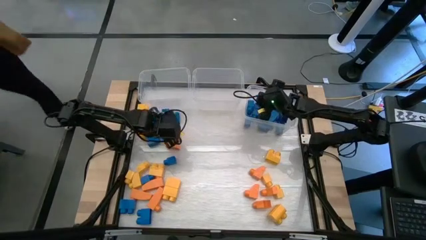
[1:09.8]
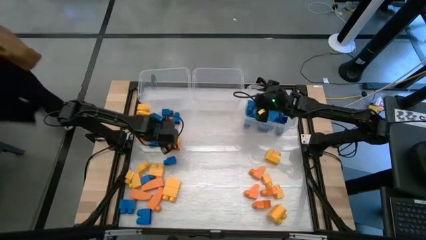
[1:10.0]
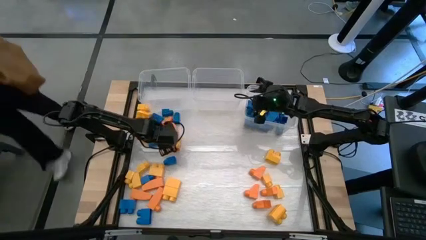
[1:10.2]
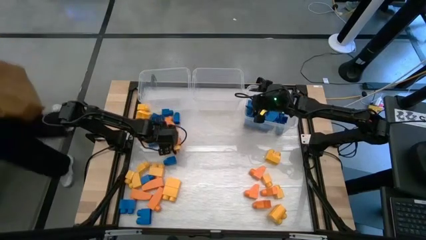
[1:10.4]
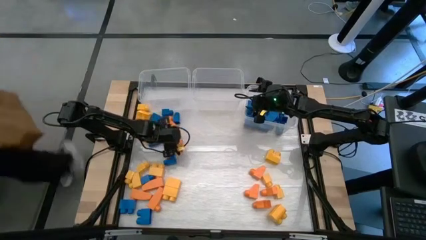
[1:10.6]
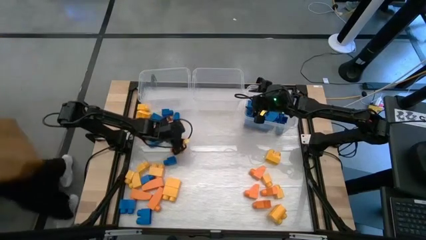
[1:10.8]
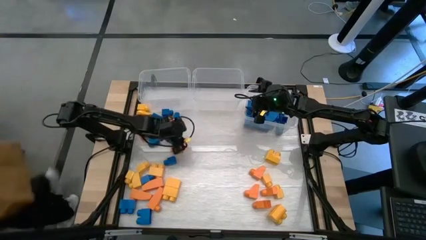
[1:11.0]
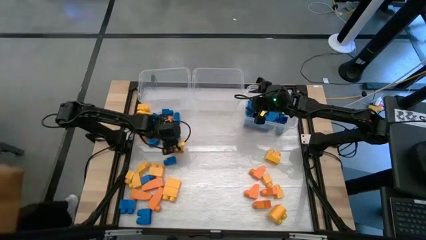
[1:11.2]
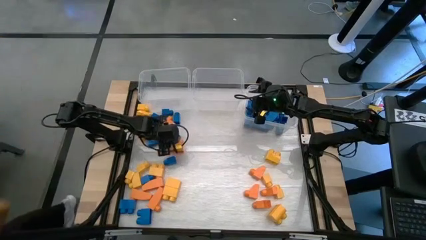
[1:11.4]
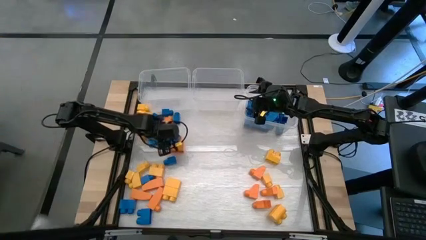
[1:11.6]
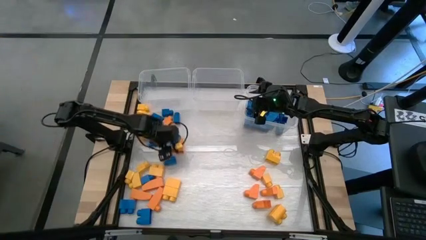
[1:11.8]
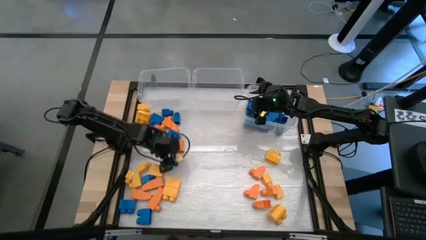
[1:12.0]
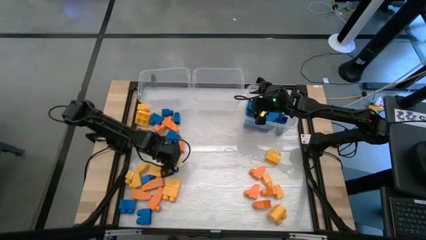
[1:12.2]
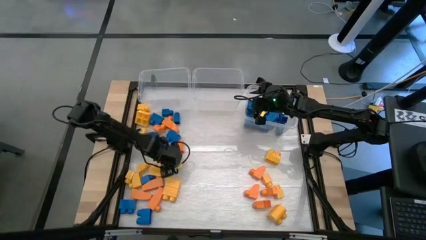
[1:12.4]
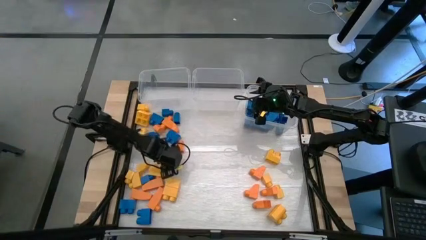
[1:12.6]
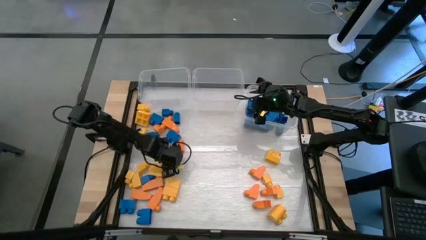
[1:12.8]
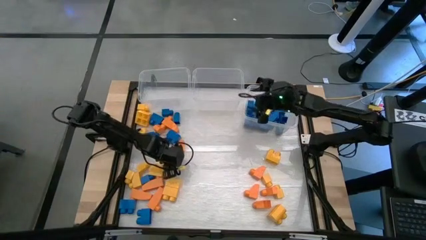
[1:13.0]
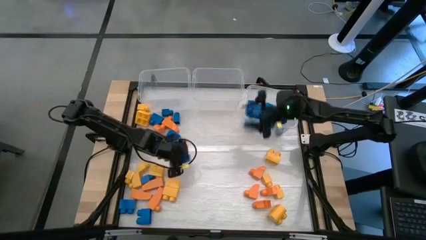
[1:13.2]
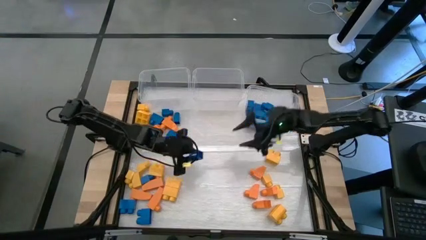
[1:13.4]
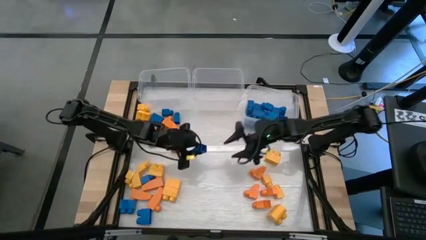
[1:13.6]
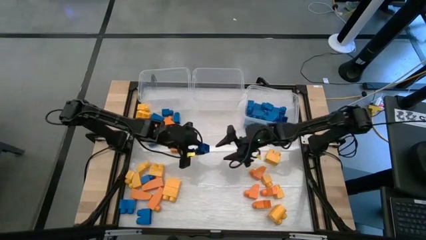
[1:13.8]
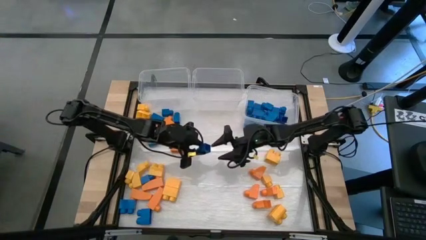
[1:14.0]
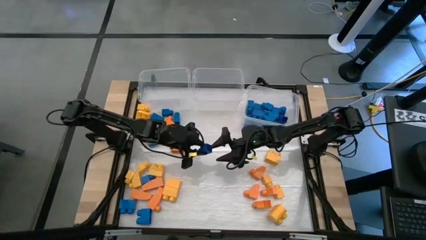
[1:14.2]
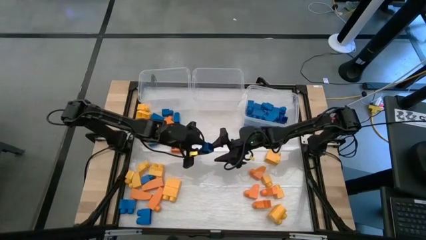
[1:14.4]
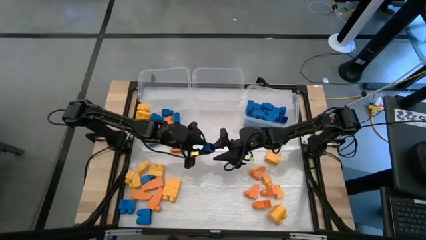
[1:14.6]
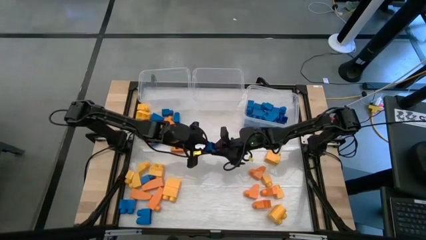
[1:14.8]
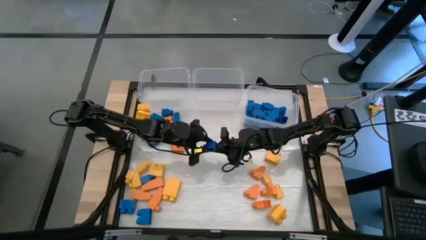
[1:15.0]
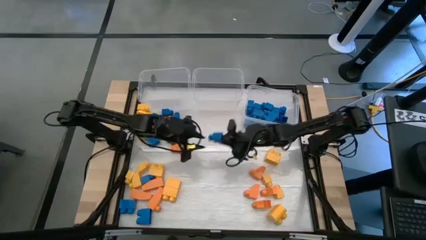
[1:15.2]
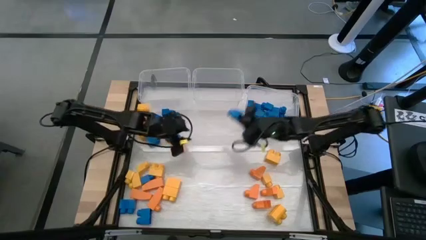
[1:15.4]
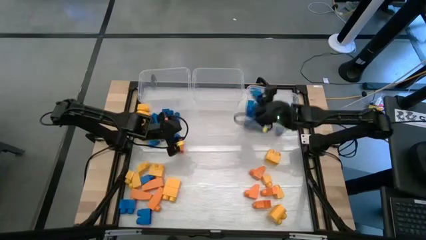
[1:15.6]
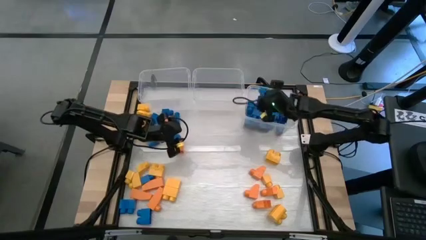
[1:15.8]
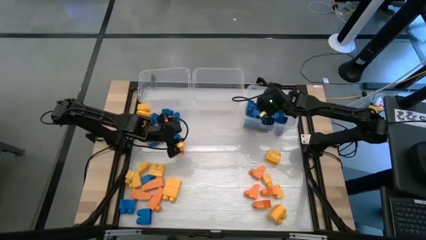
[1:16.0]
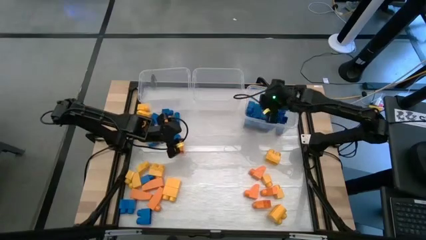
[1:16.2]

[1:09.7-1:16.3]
Task: Sort blocks
Put the blue game piece into the right transparent bin

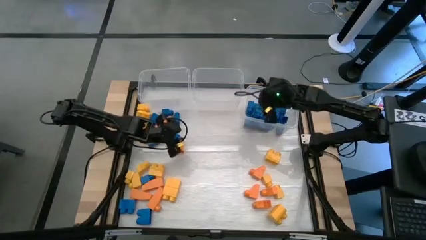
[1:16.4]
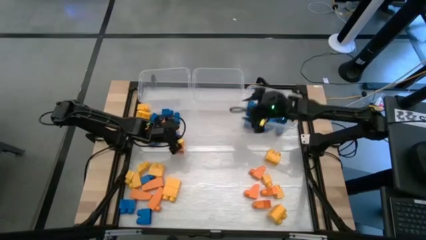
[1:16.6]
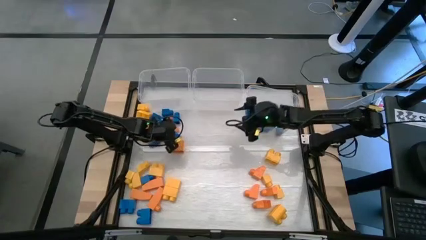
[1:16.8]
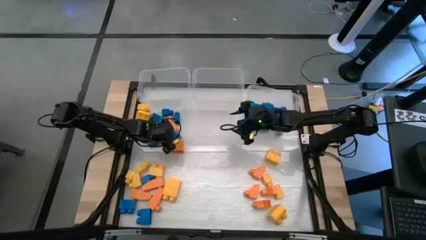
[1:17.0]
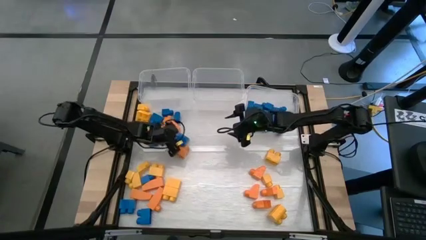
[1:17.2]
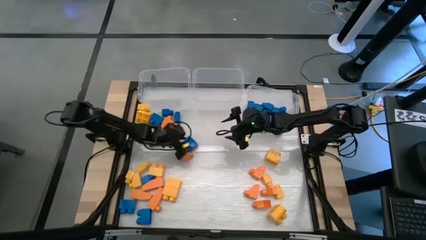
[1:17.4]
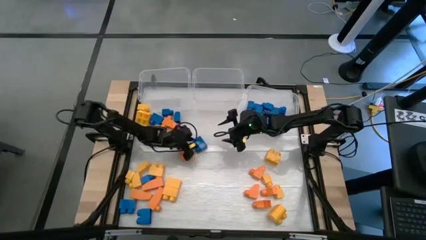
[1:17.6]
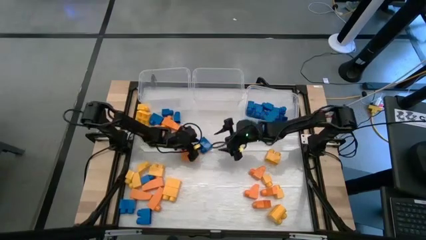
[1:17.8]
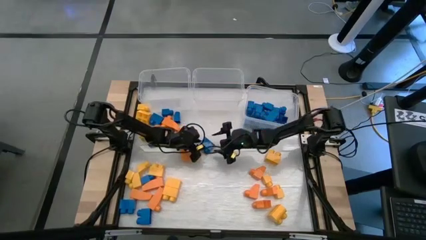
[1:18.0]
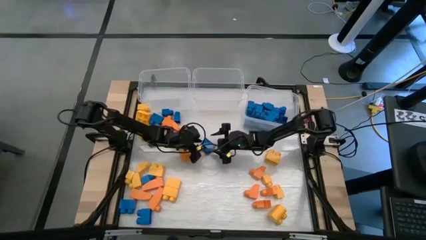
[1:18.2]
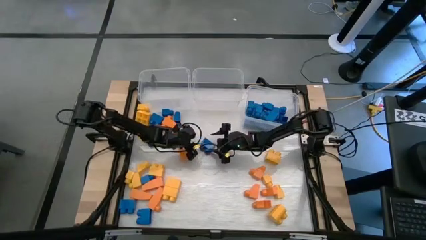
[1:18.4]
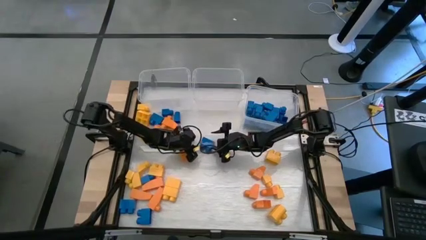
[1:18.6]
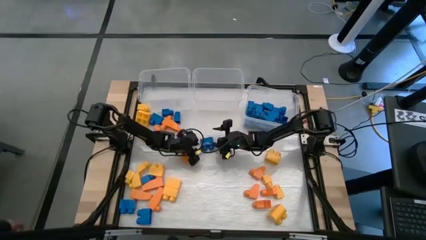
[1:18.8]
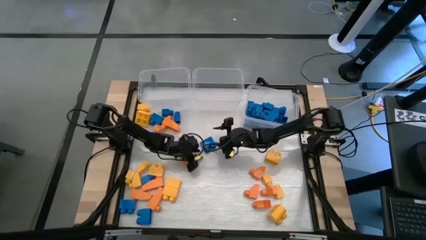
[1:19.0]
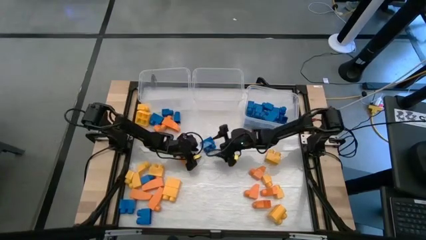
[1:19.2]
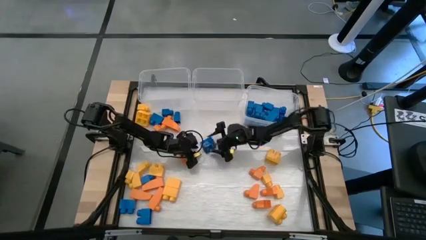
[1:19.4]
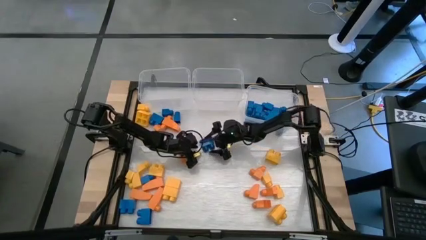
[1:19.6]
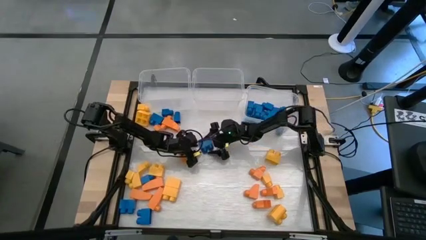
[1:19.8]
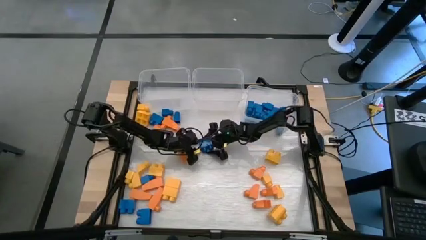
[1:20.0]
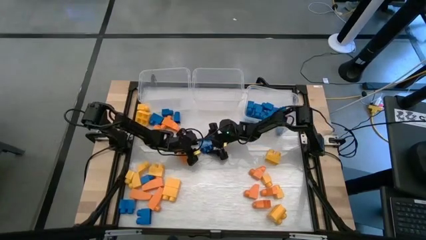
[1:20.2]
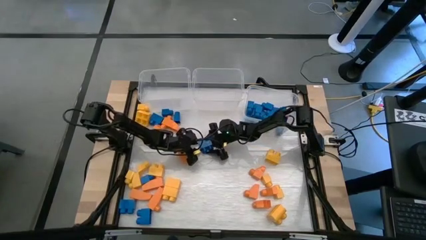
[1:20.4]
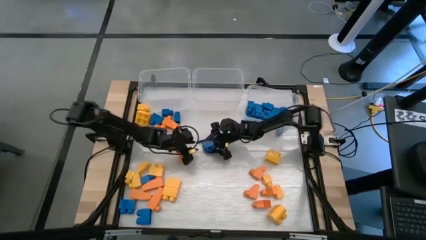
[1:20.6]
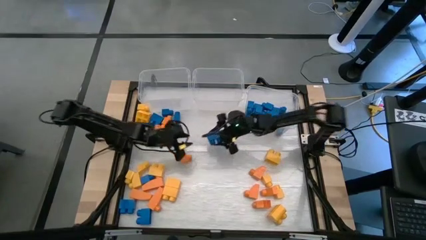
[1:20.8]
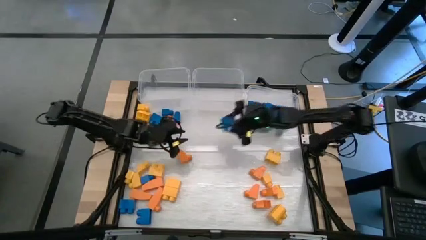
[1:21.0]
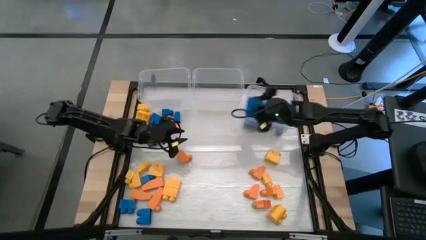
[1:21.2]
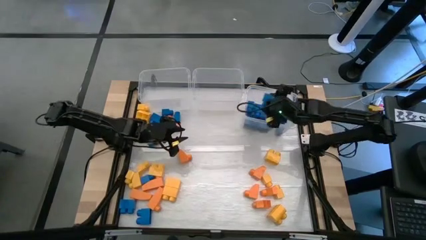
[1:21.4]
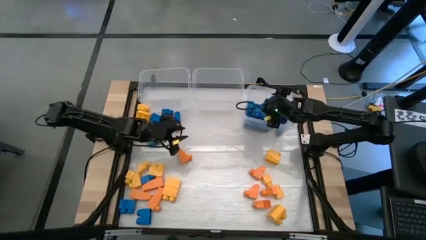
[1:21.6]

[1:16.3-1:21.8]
Put the blue game piece into the right transparent bin

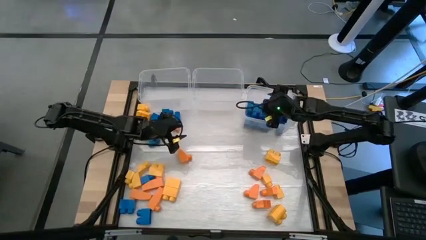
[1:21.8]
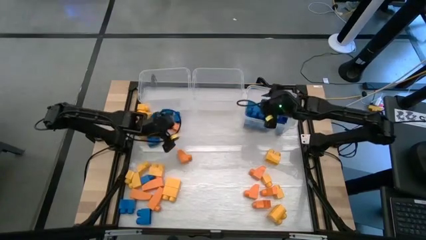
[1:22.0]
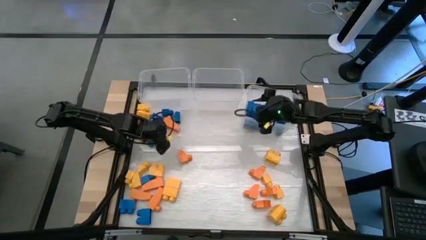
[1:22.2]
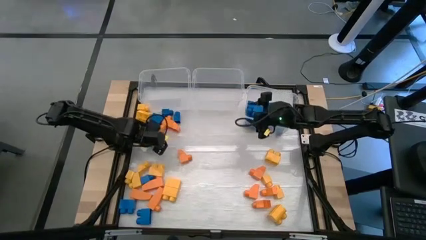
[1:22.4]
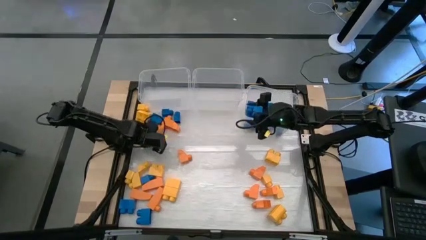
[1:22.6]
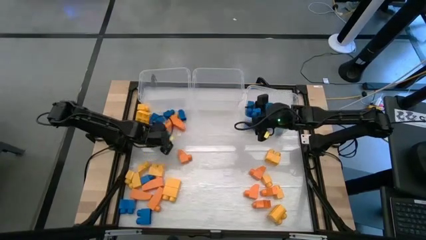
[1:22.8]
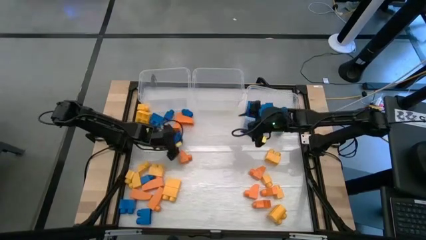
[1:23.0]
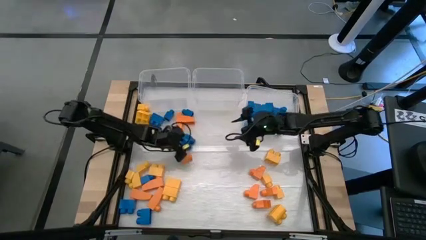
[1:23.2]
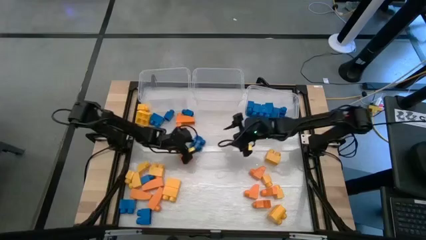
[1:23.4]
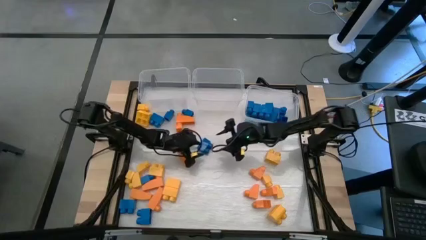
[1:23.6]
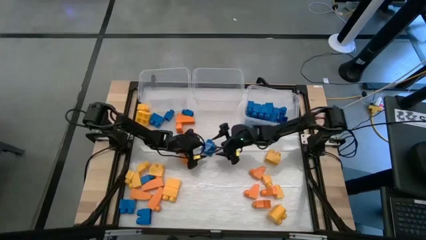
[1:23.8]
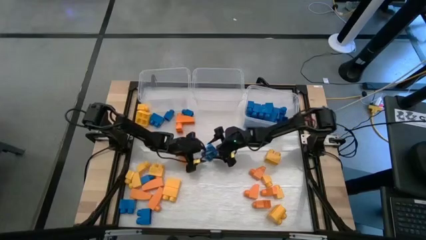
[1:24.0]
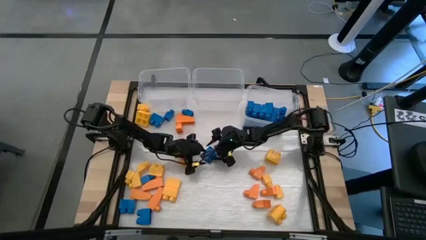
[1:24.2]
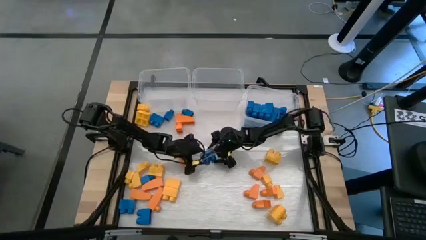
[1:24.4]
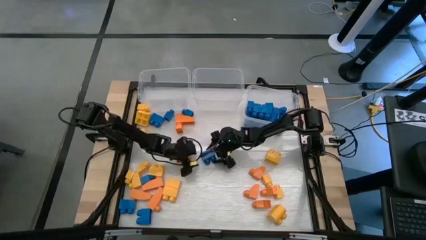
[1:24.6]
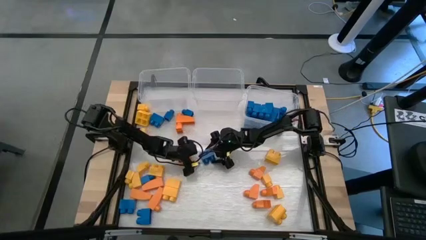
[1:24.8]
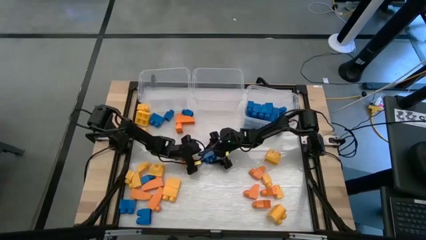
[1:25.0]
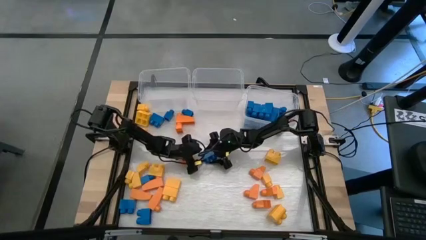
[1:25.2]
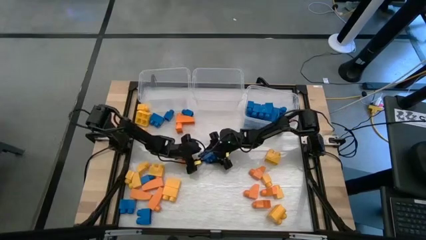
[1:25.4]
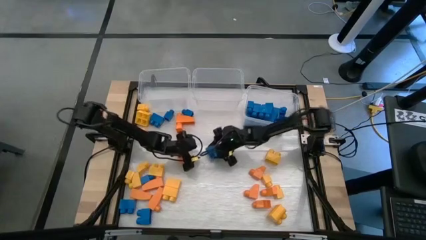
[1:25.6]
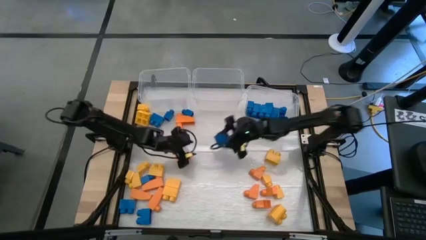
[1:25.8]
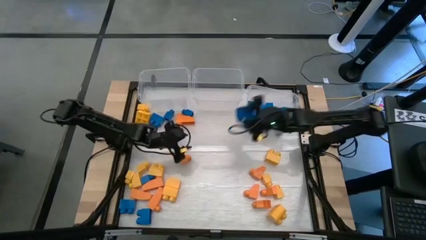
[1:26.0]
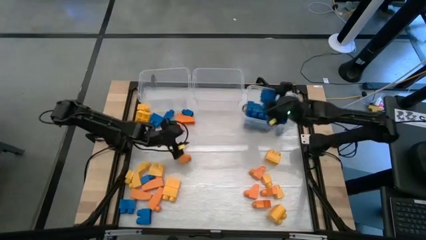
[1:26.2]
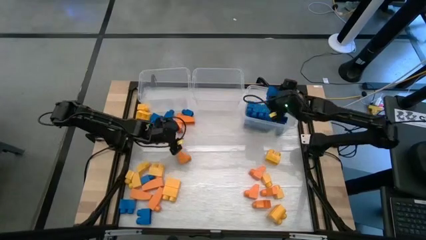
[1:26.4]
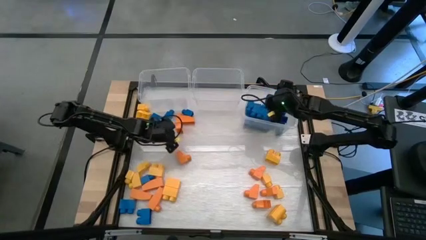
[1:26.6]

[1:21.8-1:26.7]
Put the blue game piece into the right transparent bin

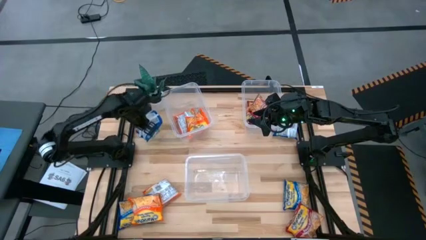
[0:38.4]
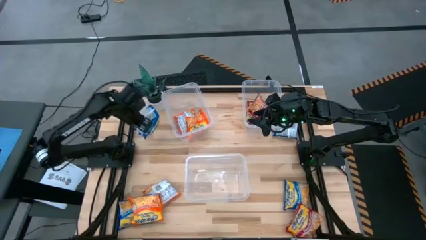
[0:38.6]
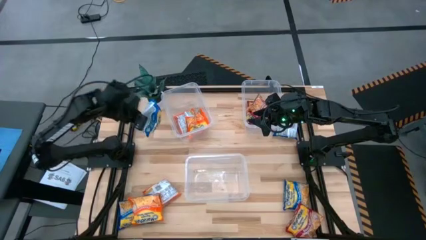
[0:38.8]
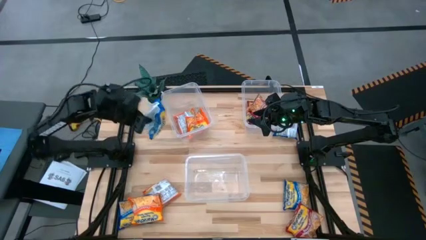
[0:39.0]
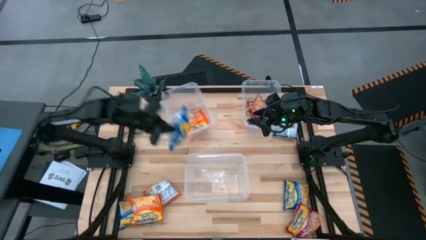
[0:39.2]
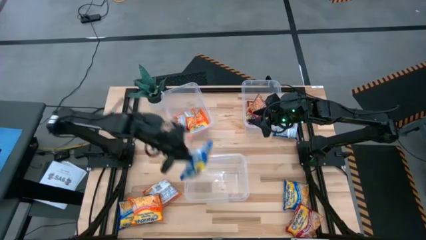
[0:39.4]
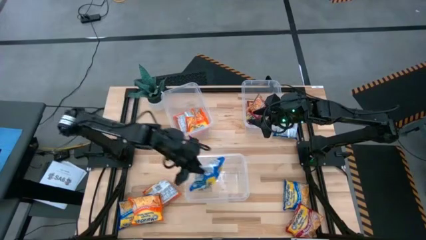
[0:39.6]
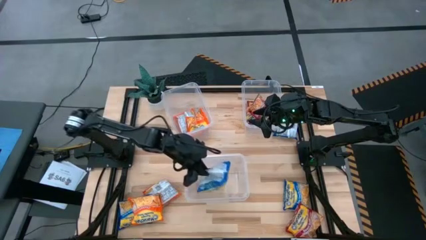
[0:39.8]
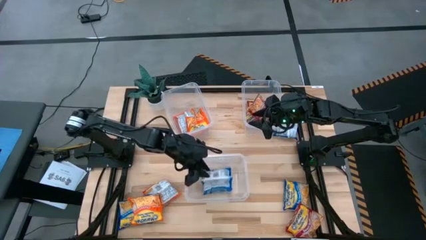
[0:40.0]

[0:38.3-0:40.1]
Task: Sort Maruchan noodles
Put the top left blue bag into the bottom transparent bin
